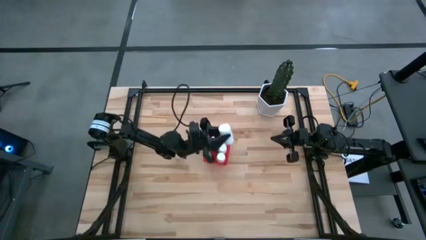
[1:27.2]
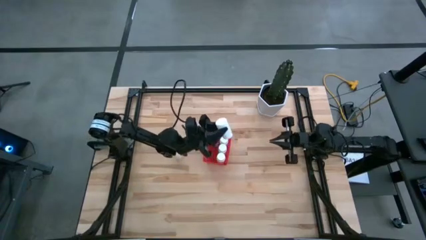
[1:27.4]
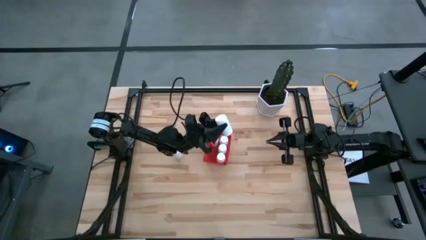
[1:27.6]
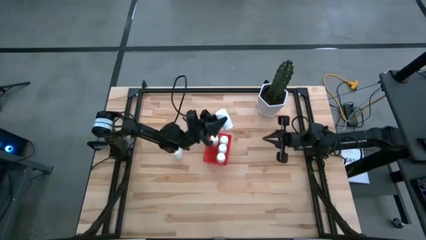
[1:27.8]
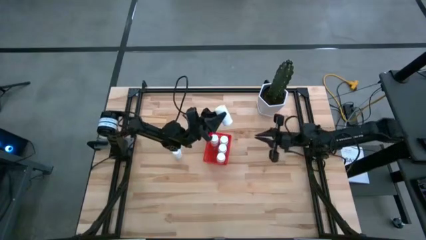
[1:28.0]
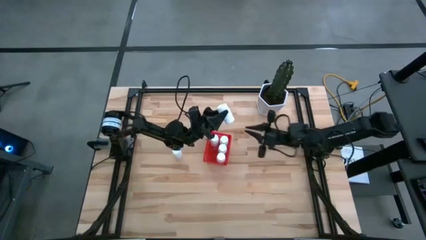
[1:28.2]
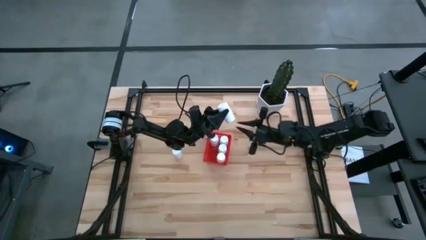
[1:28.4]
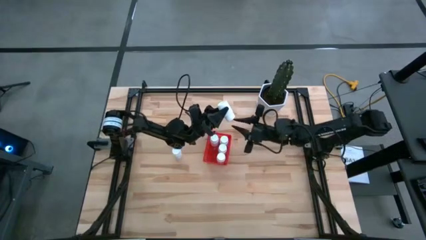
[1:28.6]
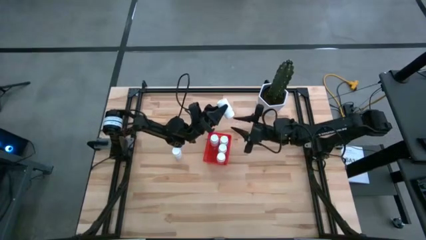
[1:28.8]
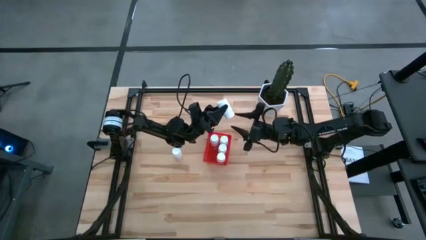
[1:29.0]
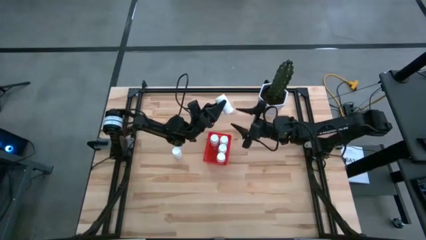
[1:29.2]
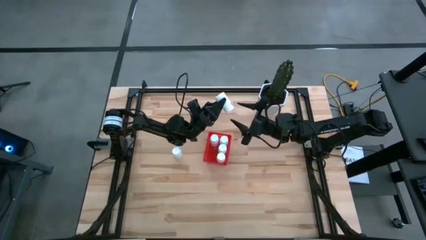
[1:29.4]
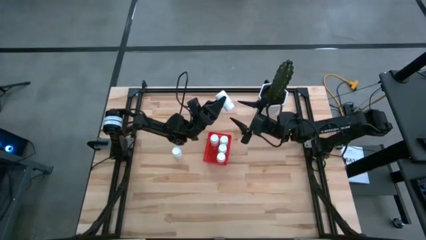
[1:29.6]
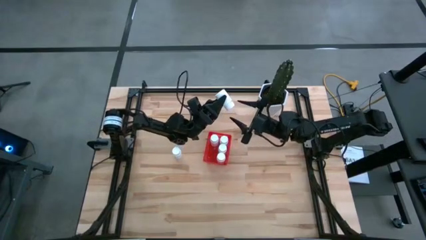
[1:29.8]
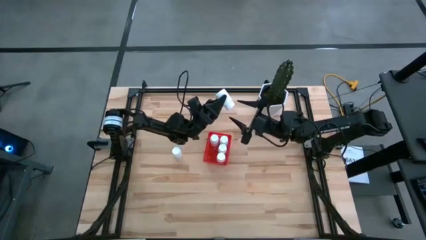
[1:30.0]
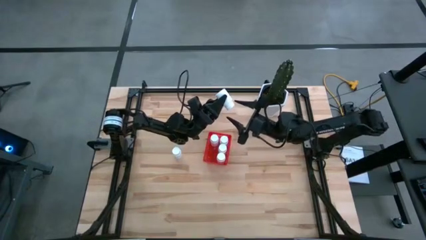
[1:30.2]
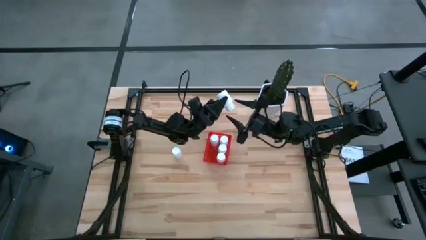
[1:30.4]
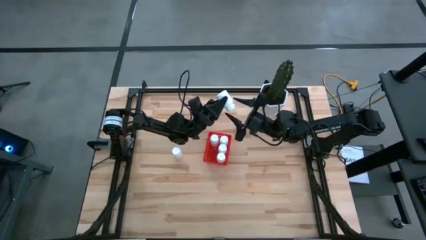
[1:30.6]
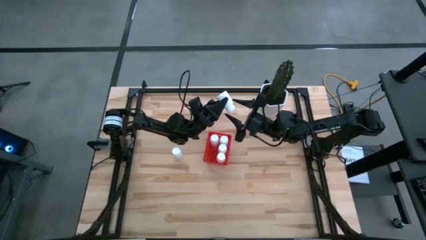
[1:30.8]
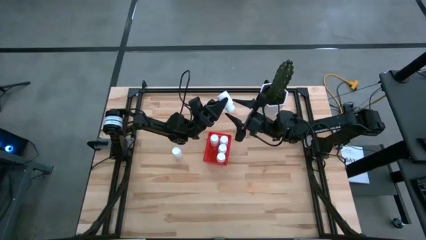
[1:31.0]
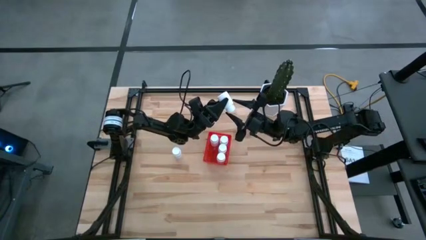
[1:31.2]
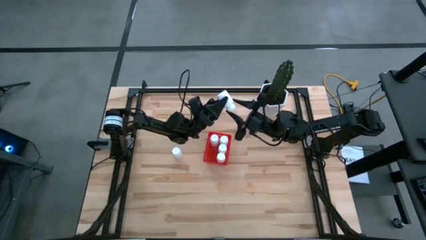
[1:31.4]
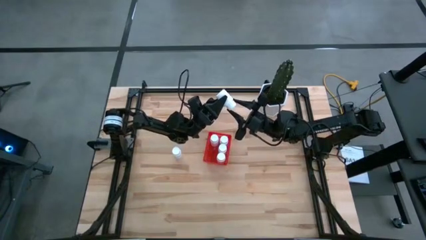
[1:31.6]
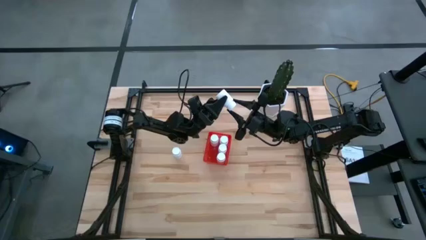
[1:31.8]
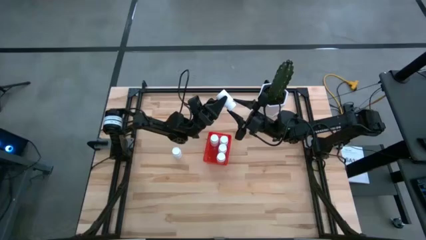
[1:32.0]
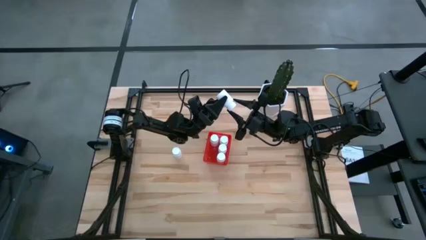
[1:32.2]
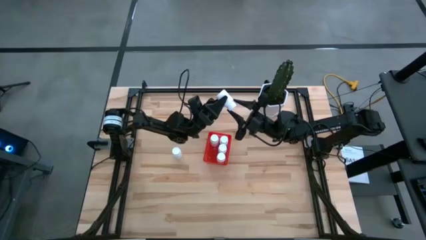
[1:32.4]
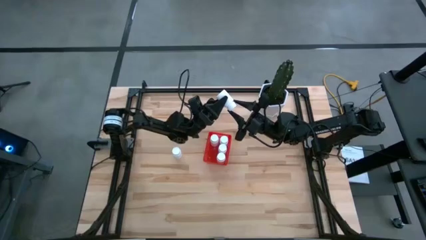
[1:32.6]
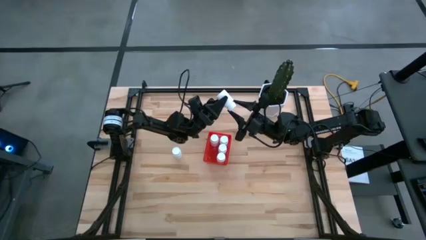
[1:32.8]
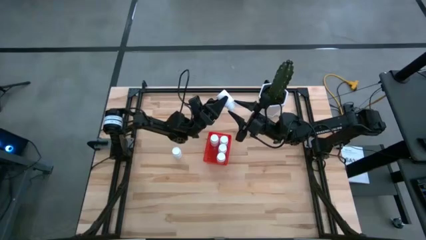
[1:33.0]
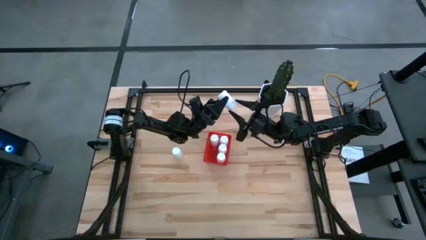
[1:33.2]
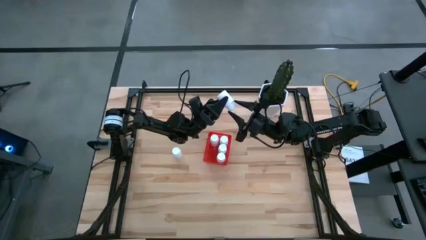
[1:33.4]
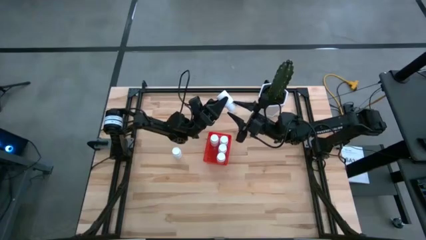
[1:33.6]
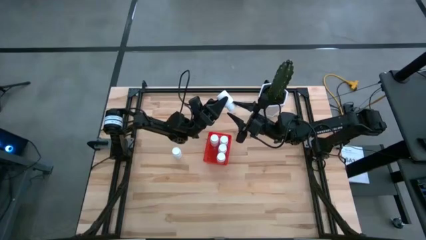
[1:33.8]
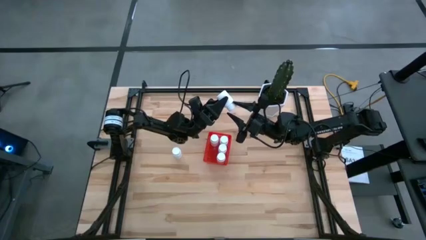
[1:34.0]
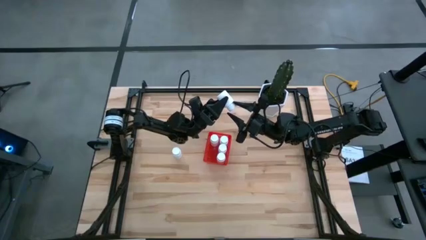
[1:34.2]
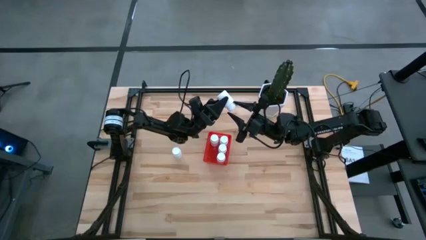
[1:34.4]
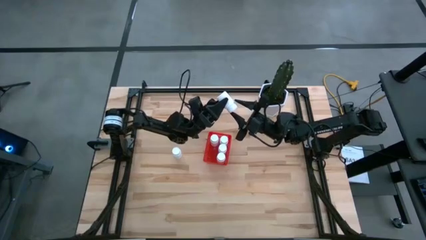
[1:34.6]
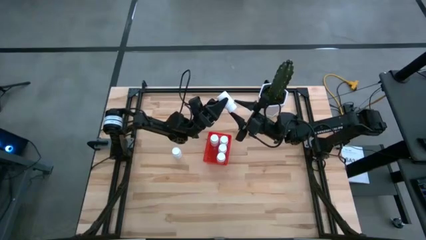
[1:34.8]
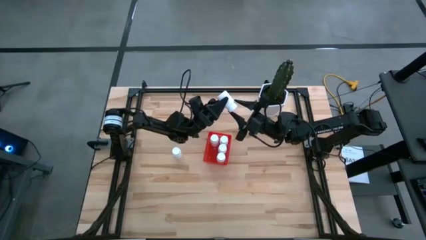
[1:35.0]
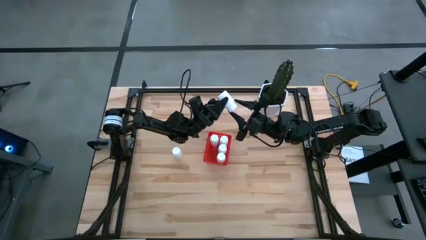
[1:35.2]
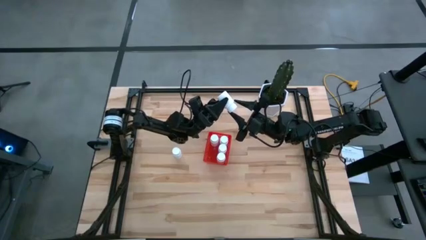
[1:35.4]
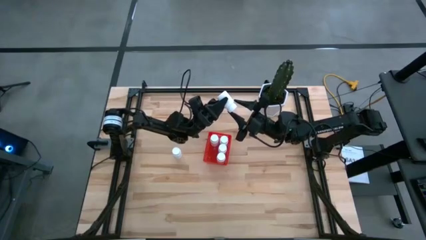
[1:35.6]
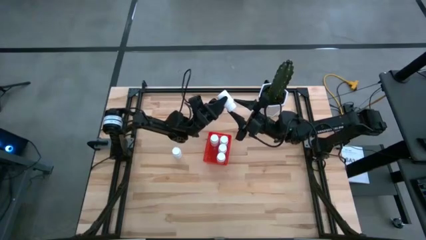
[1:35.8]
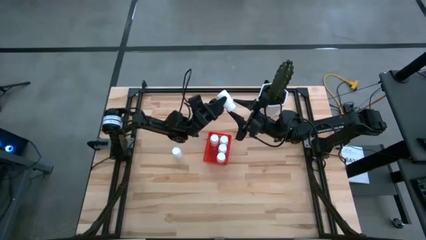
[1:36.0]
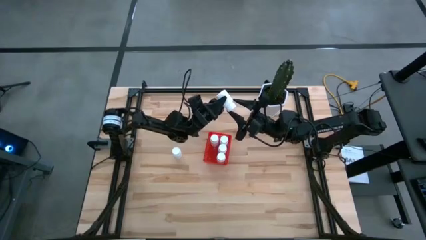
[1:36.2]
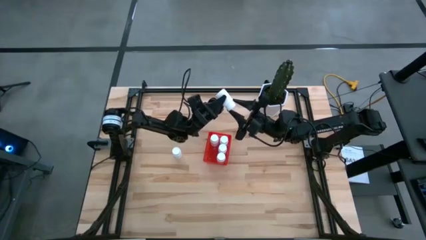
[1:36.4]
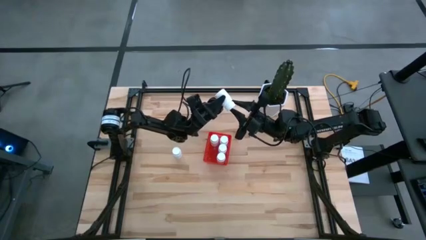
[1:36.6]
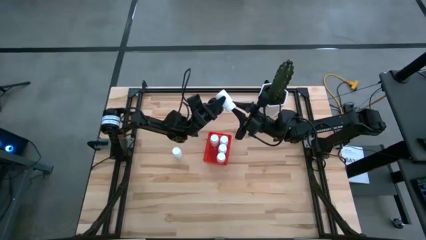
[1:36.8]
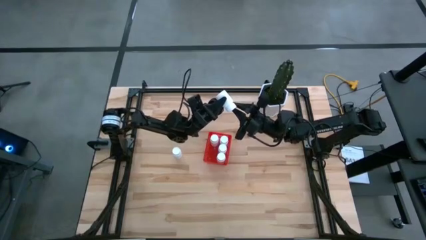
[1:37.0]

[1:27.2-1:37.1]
Task: Pick and place pill bottles into a basket
Put the left white pill bottle into the red bin
